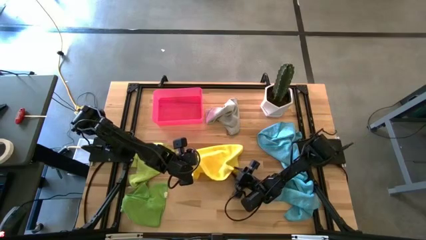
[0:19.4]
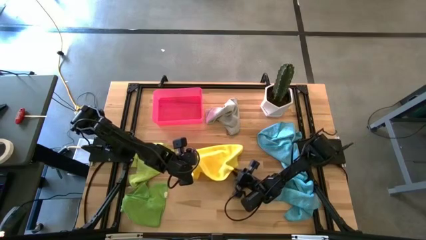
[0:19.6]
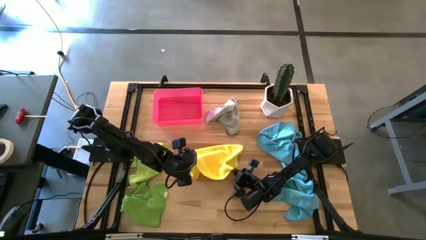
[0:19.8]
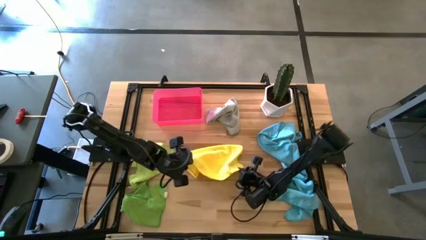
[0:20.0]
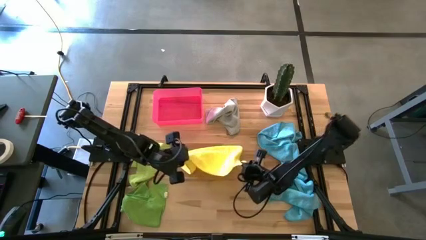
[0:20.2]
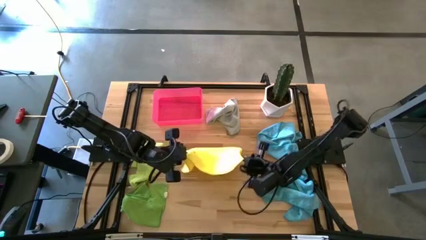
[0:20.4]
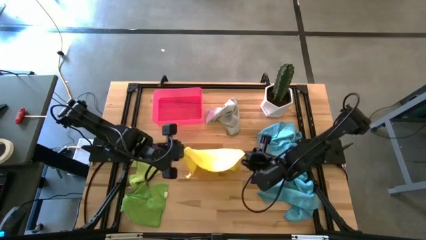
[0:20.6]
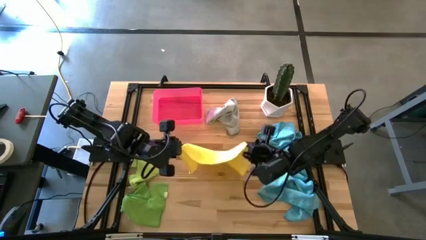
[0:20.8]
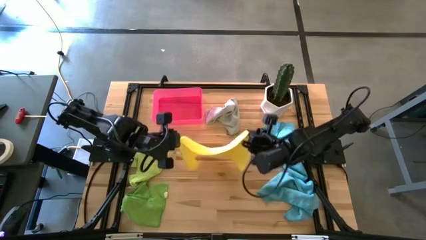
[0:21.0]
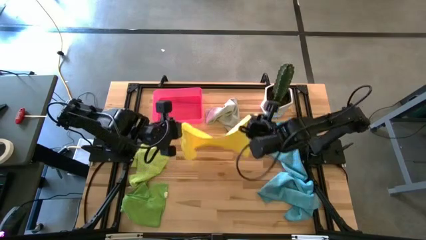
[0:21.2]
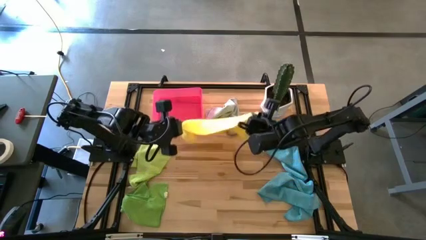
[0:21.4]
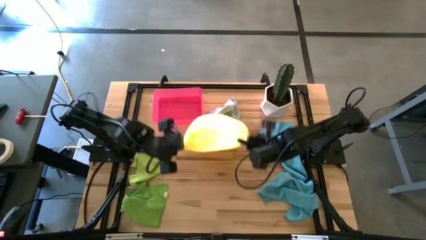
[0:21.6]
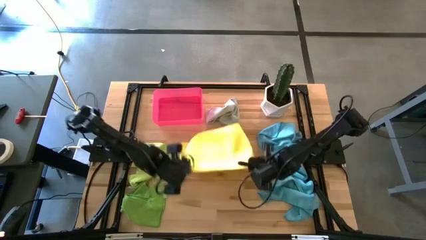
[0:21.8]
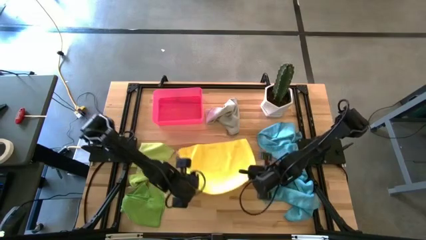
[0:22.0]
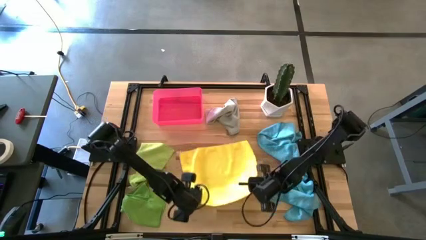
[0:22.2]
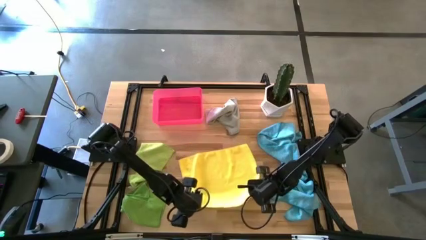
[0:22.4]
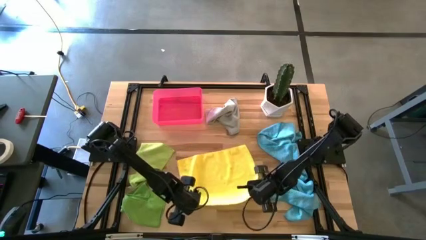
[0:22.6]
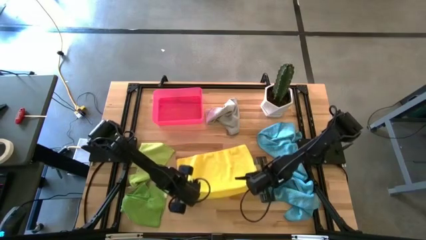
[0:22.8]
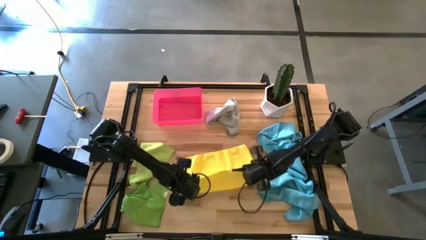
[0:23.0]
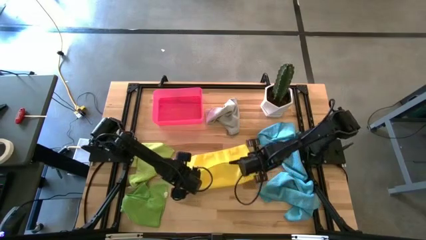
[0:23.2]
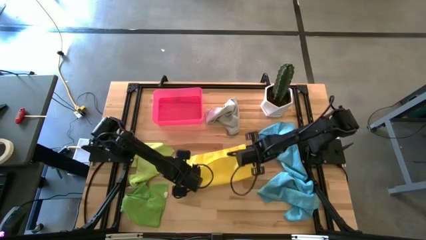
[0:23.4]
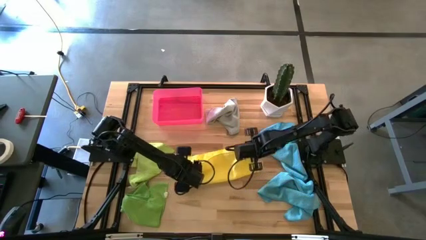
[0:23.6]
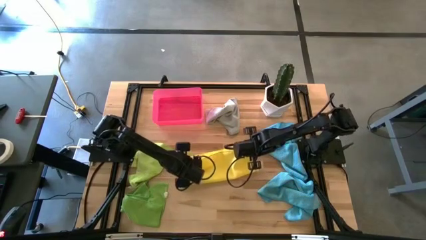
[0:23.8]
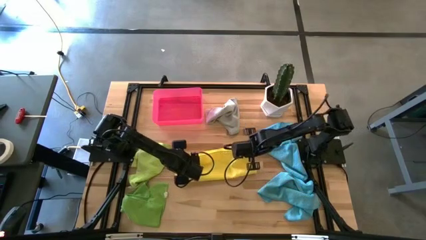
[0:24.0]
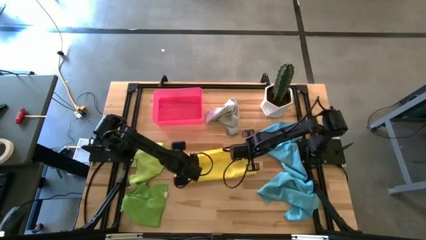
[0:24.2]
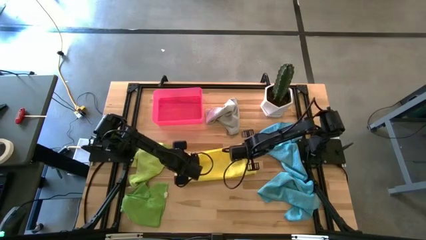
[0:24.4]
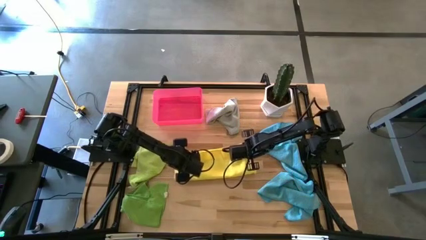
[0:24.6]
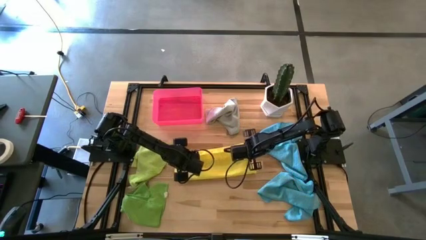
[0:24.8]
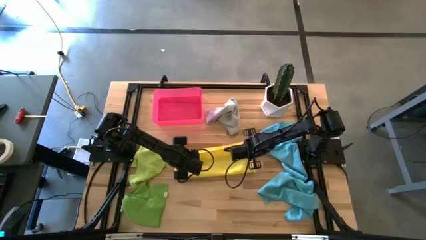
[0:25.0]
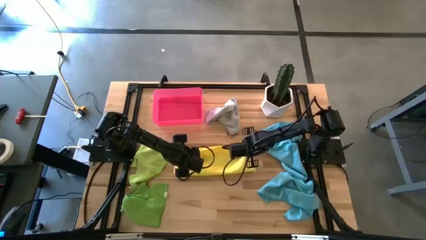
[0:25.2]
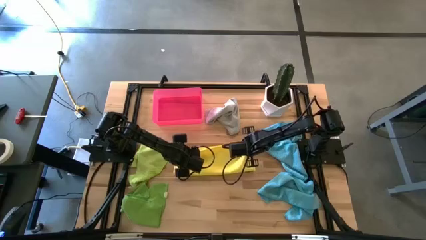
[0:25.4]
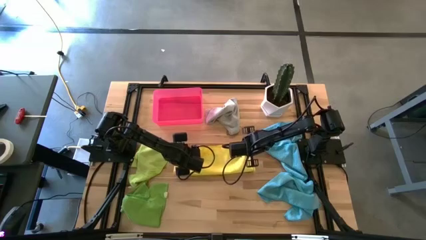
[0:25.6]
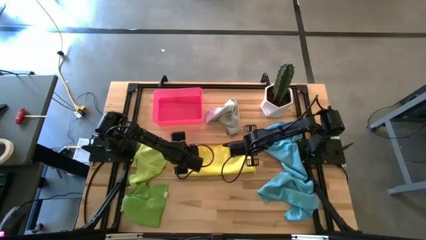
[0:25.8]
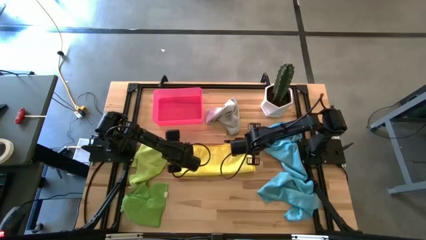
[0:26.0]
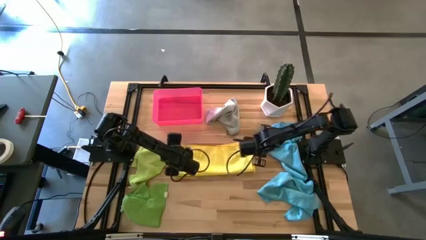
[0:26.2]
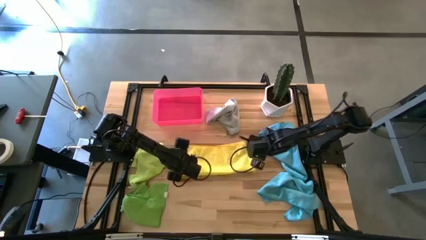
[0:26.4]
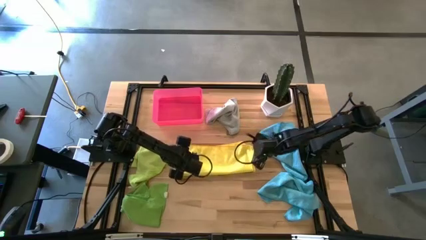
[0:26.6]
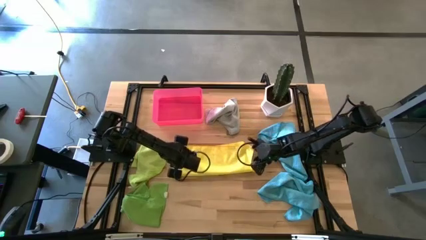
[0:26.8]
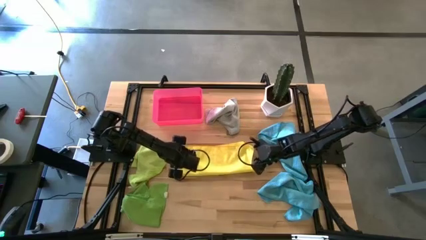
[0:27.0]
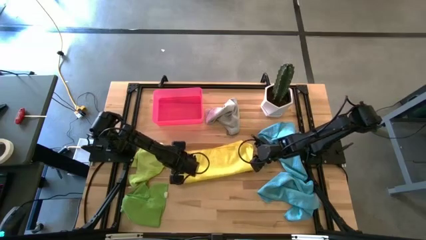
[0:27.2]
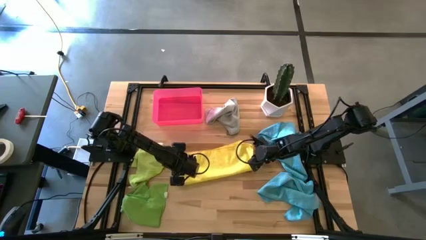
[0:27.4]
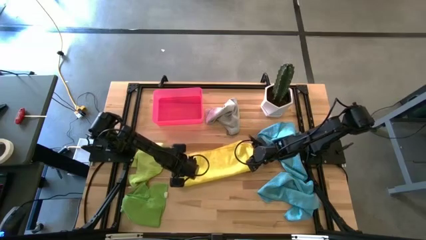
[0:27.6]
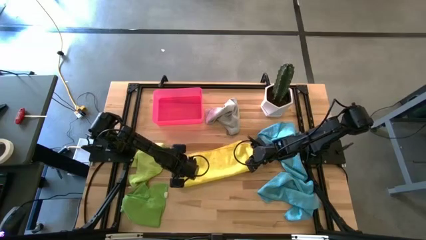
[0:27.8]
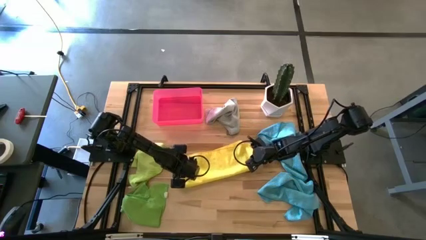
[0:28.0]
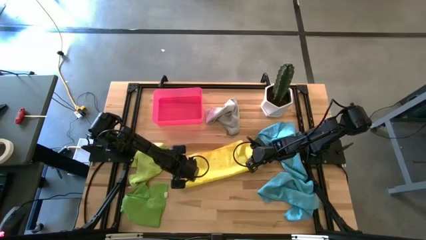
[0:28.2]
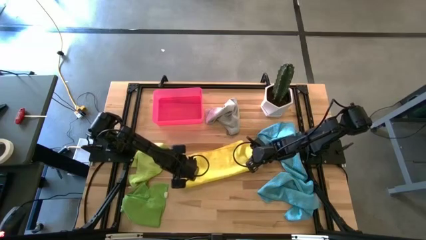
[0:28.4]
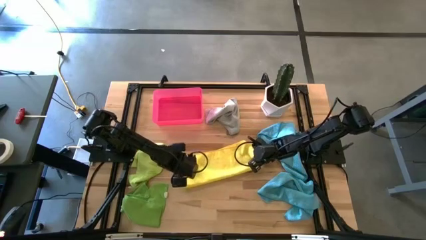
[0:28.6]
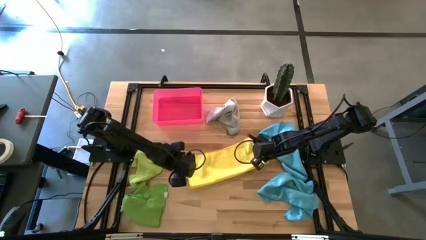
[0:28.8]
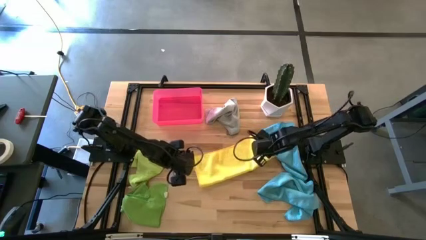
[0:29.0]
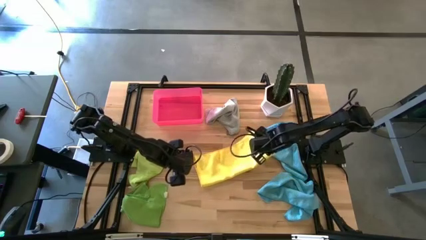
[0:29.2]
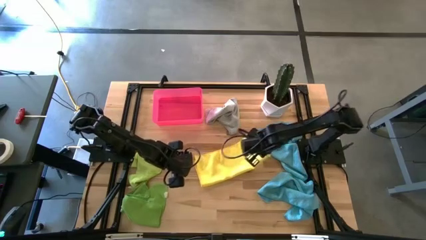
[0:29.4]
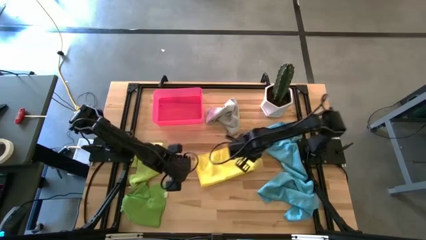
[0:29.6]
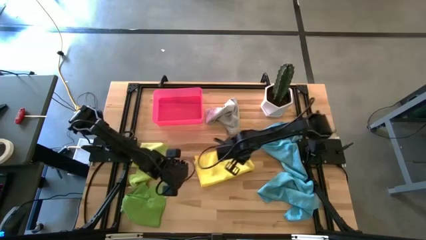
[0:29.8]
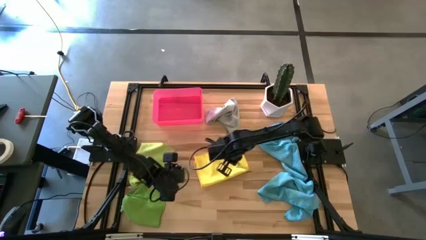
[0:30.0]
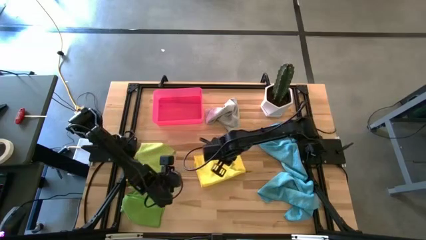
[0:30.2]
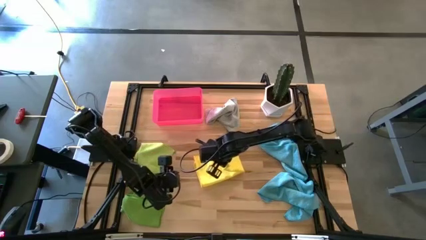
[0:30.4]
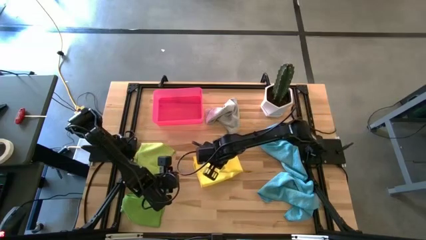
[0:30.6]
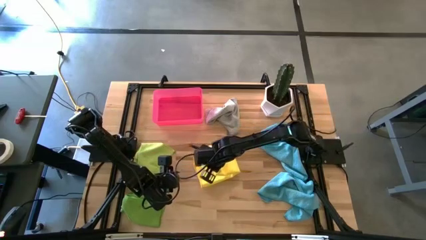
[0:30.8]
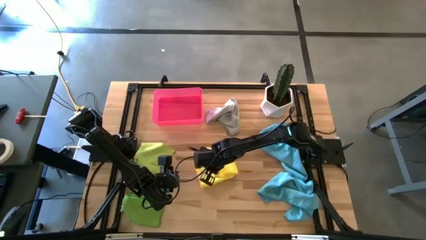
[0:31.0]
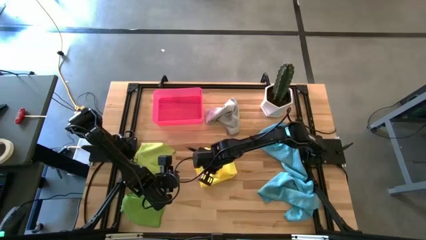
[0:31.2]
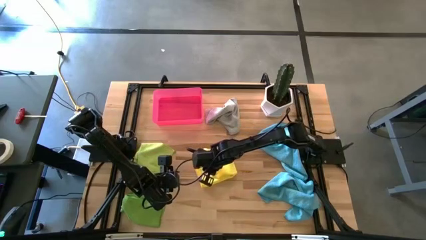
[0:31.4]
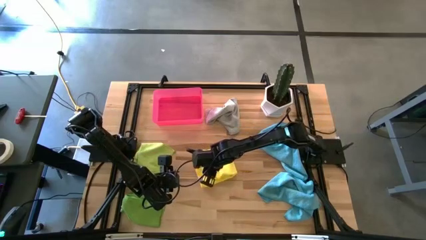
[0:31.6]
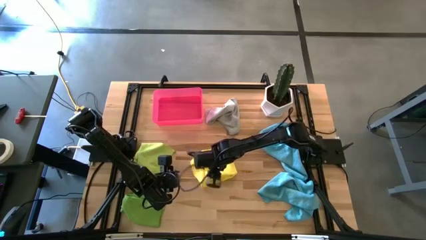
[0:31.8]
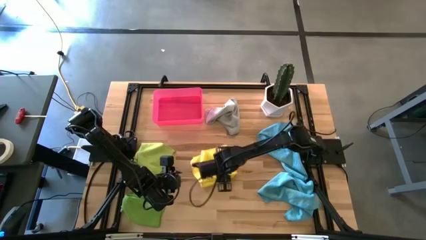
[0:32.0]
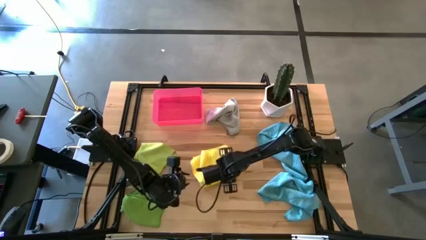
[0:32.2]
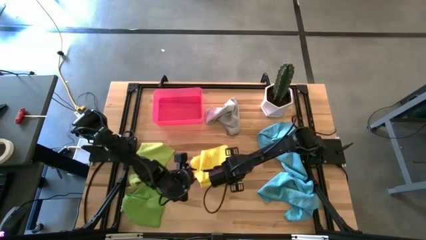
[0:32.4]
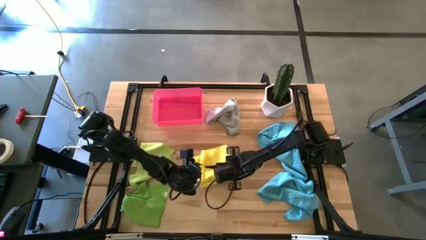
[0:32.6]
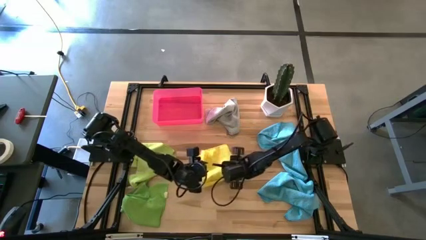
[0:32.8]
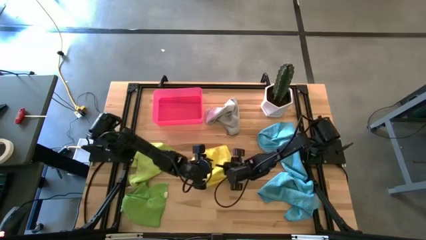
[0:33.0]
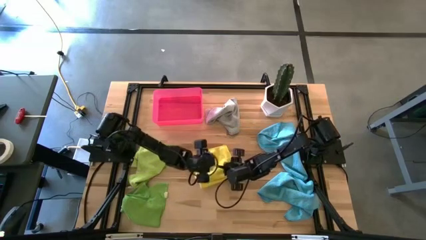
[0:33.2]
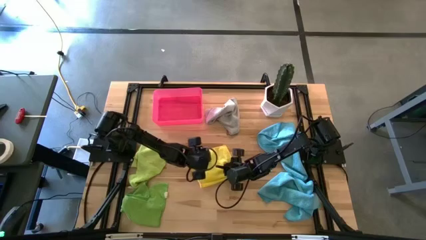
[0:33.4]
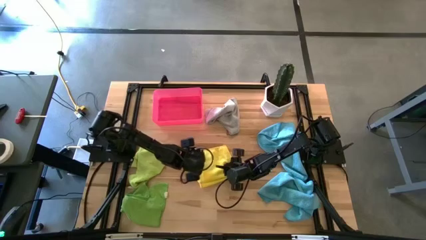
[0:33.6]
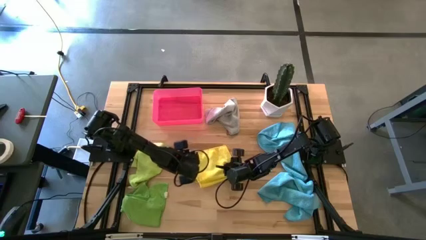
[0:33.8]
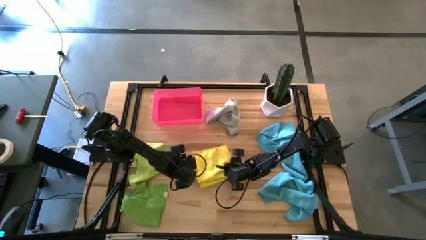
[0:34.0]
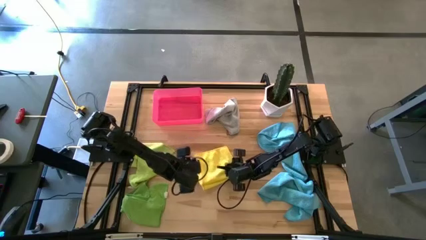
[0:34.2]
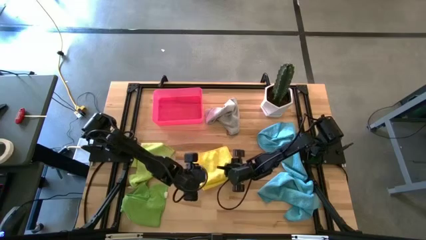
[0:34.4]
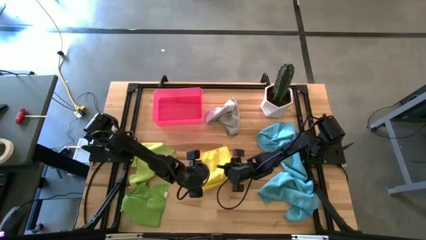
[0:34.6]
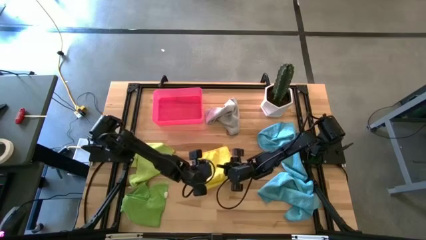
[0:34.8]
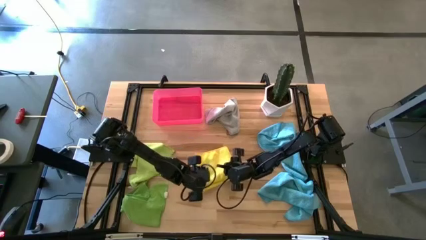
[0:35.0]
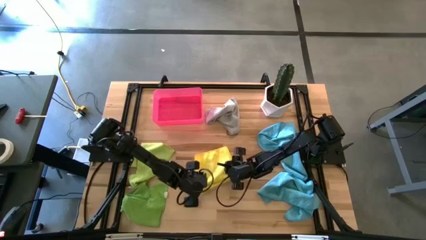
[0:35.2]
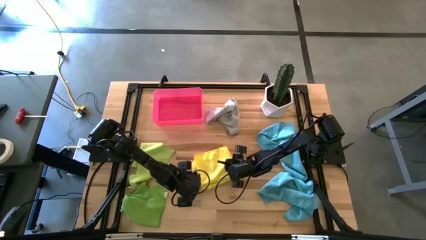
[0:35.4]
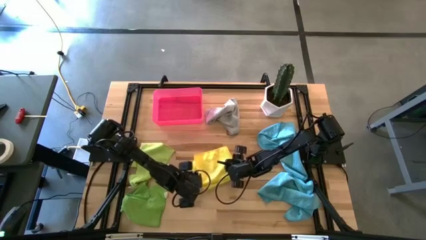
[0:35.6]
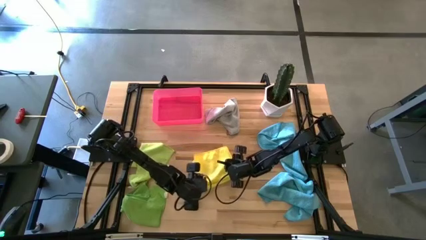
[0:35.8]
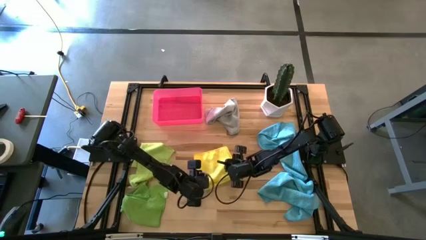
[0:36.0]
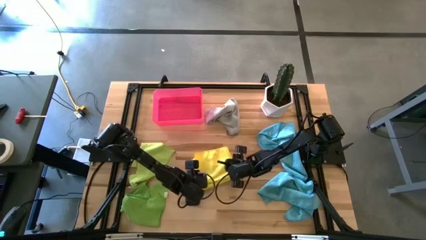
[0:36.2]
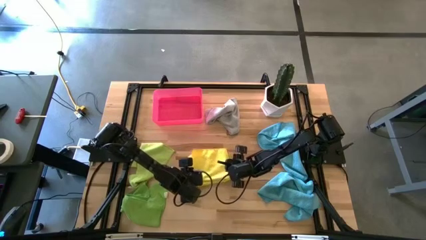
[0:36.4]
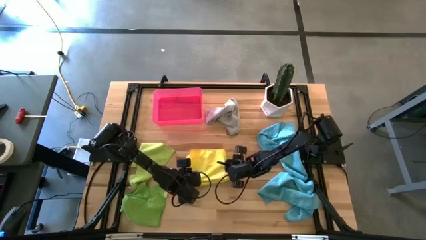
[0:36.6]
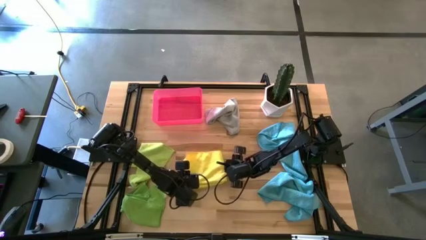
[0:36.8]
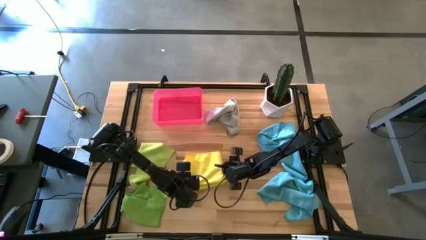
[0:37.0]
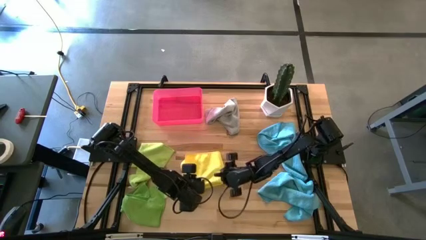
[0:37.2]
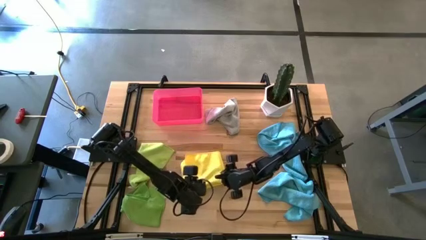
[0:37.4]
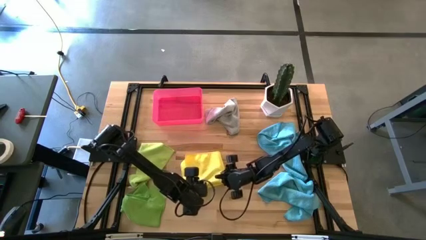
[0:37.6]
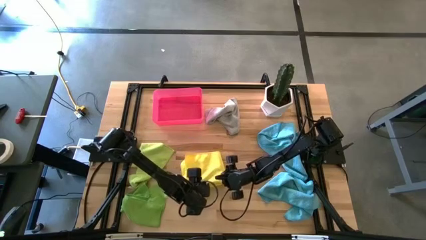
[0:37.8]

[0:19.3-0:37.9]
Task: Fold microfiber towels
Fold the yellow towel on the table
